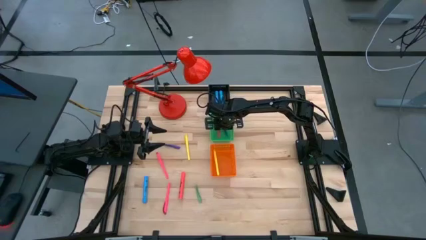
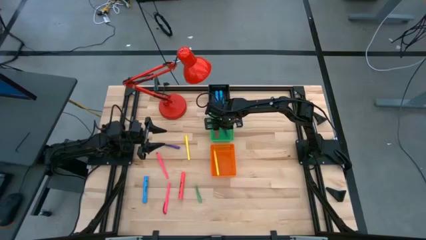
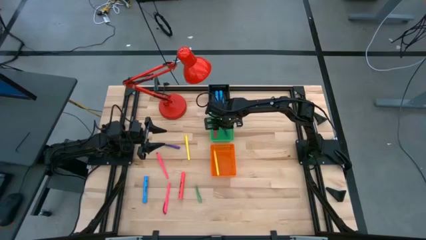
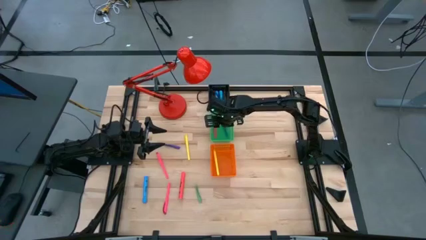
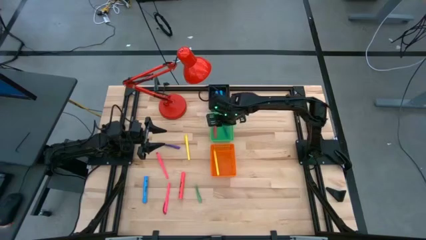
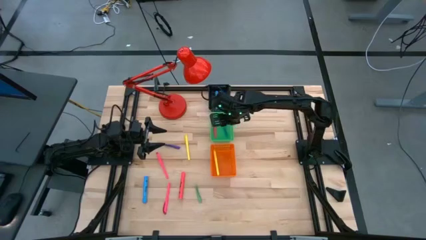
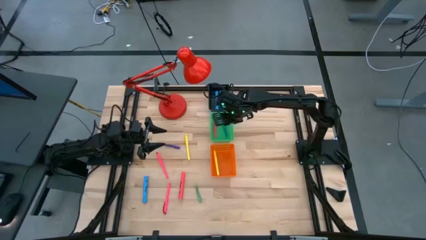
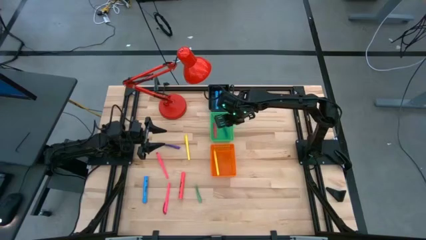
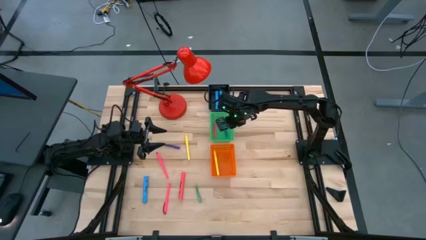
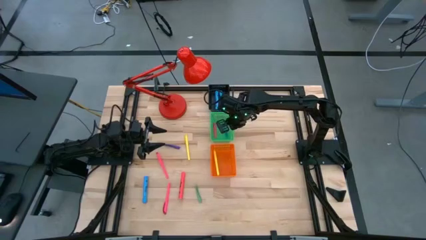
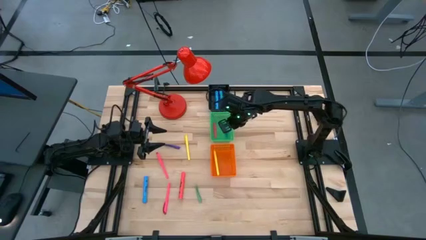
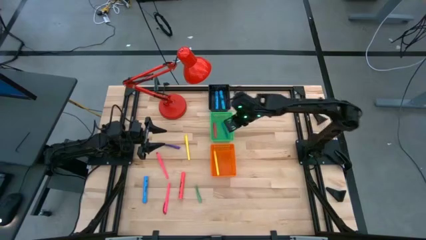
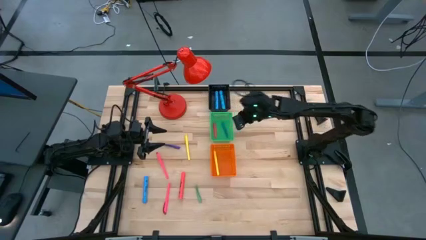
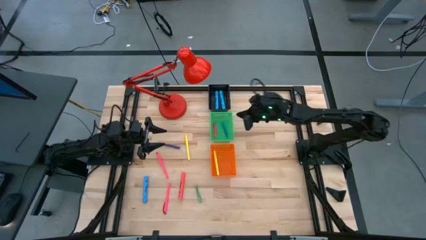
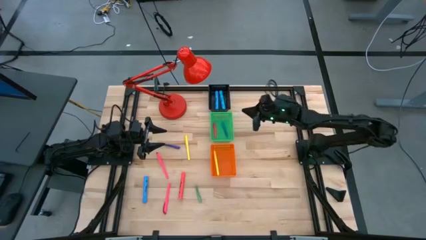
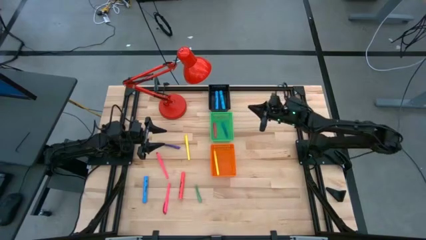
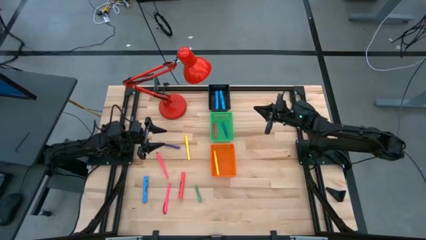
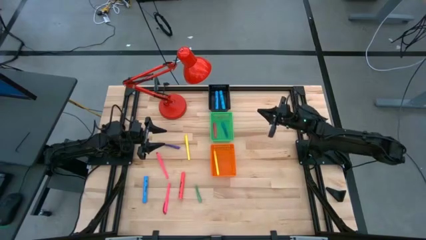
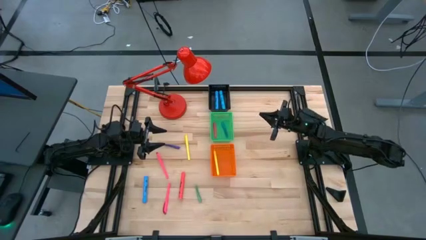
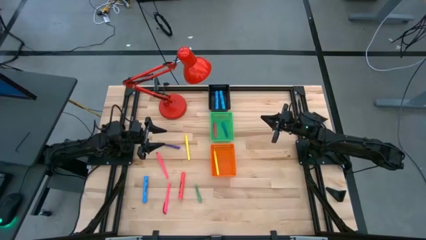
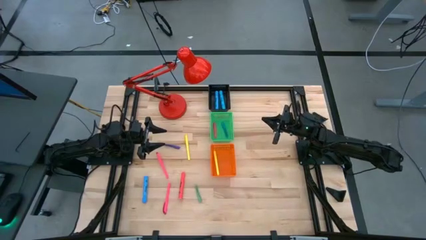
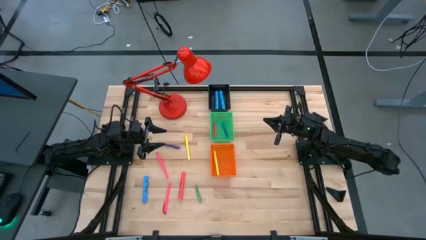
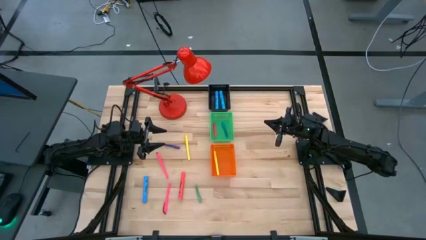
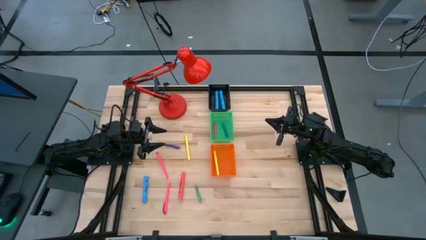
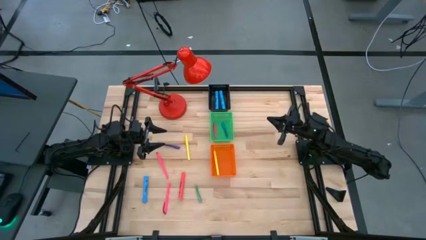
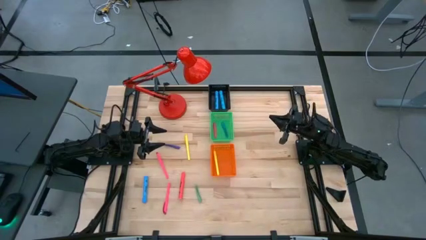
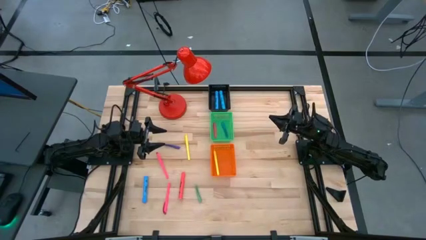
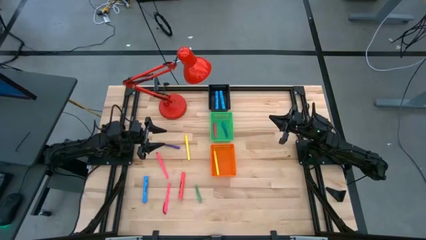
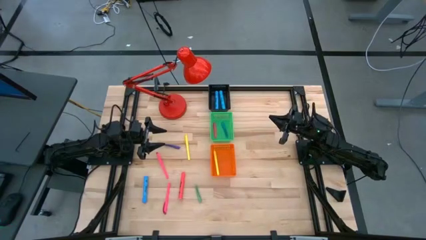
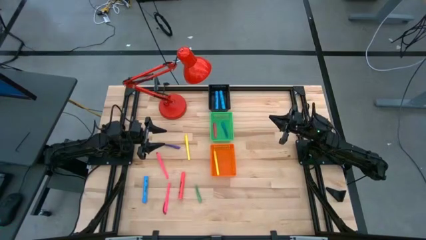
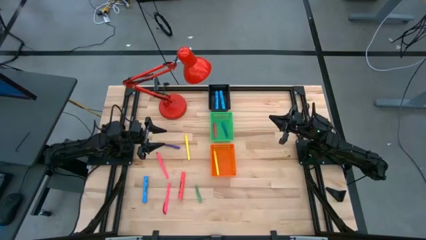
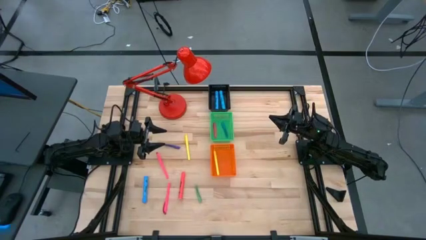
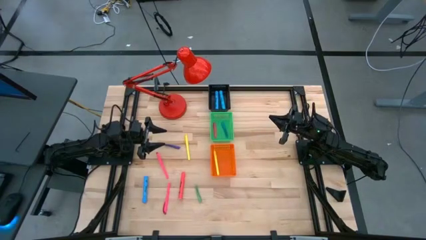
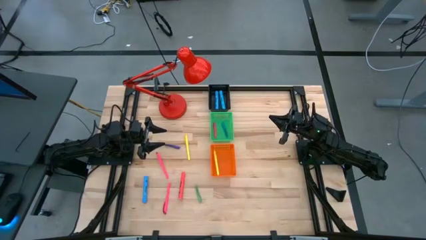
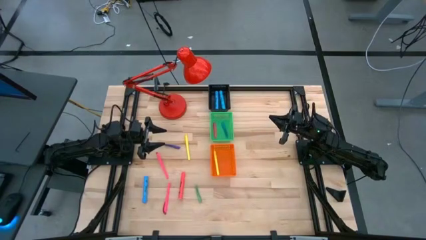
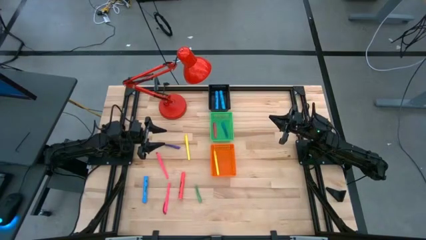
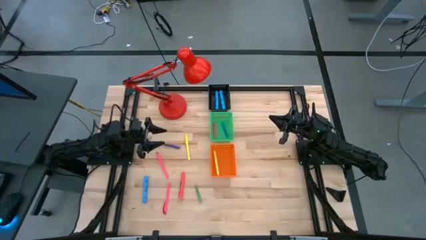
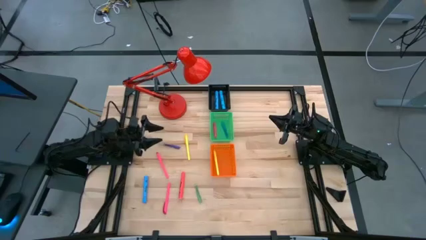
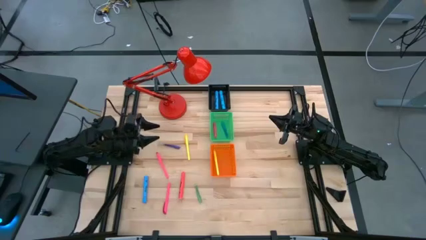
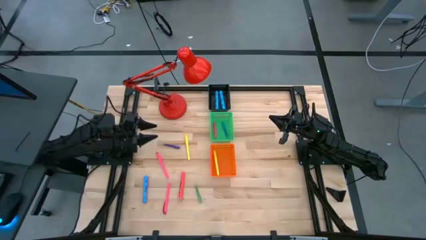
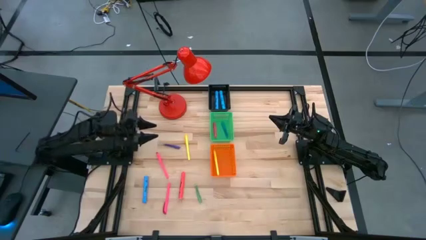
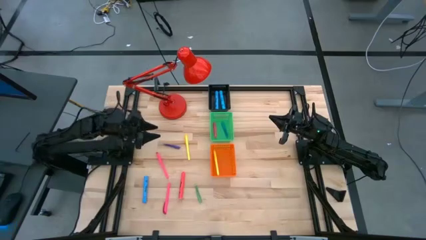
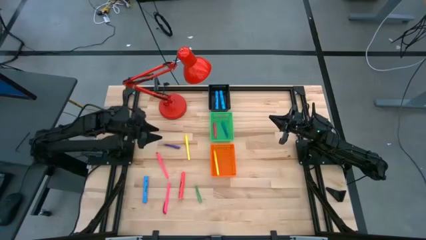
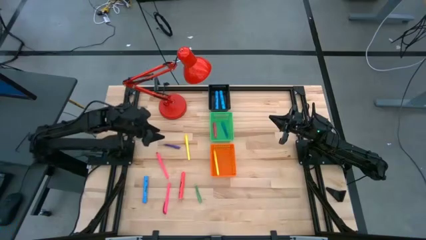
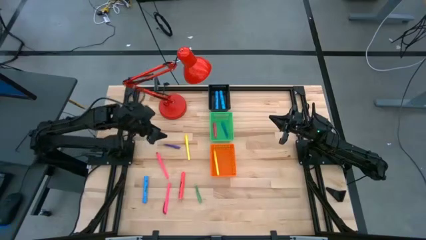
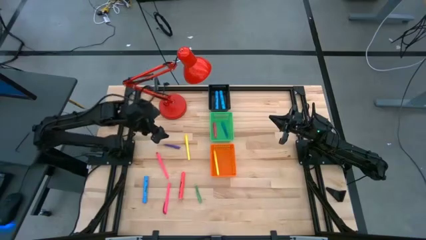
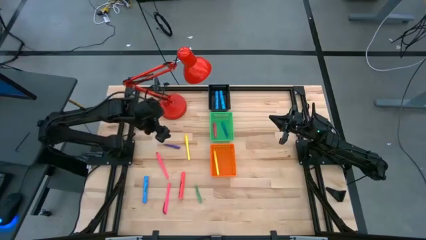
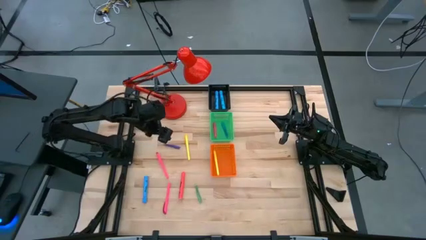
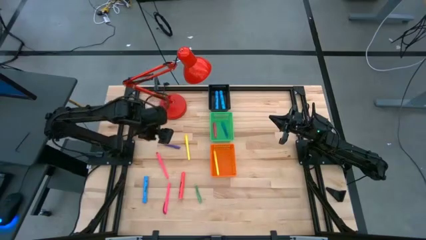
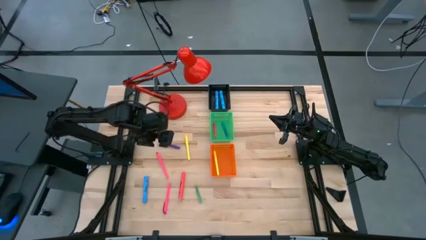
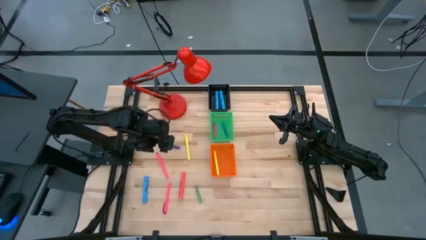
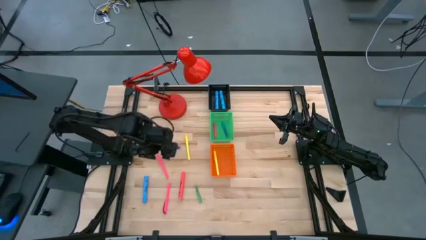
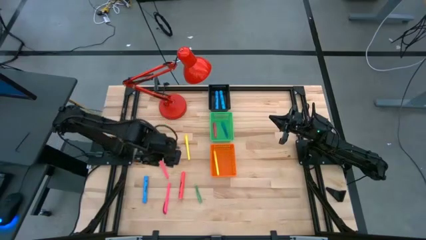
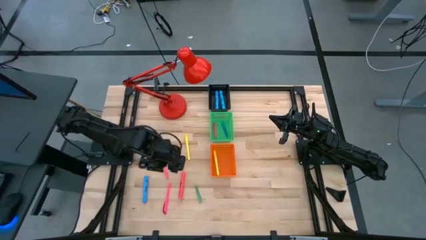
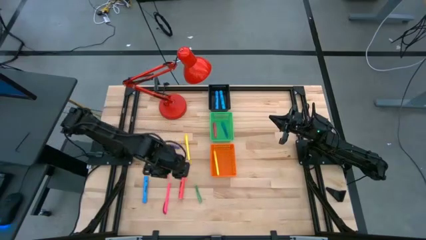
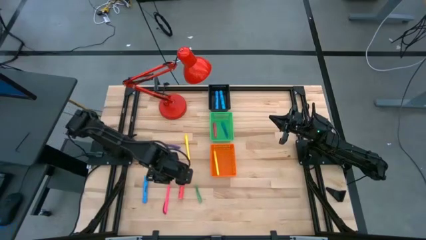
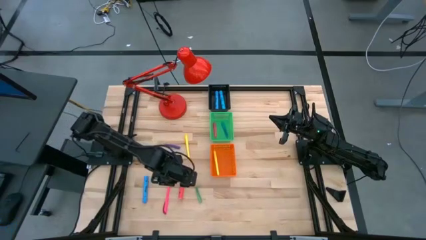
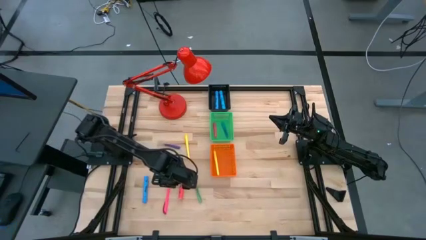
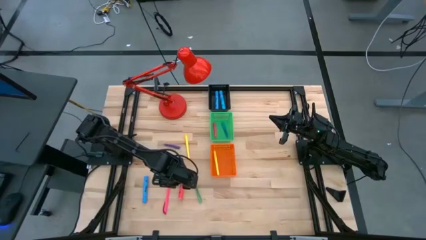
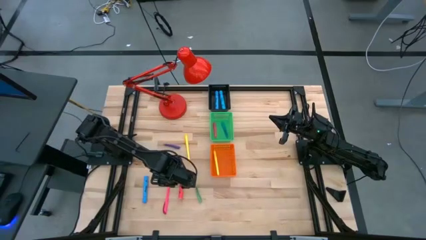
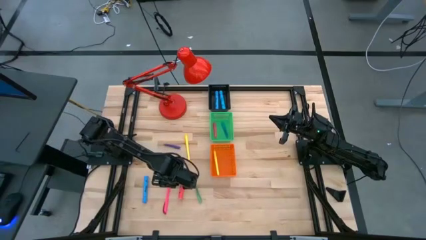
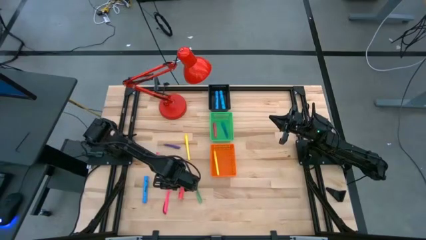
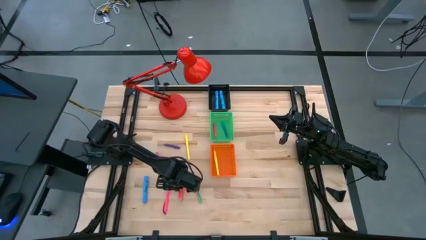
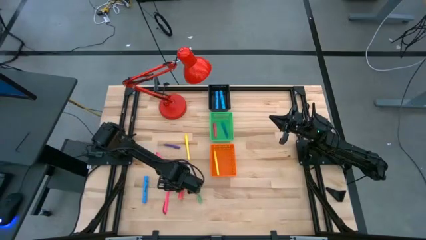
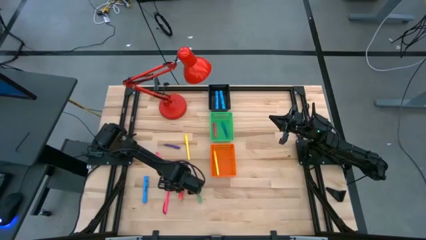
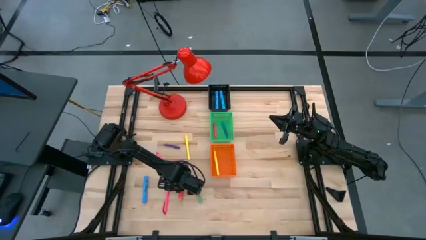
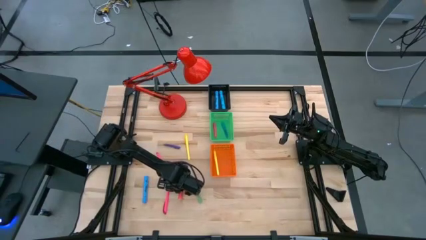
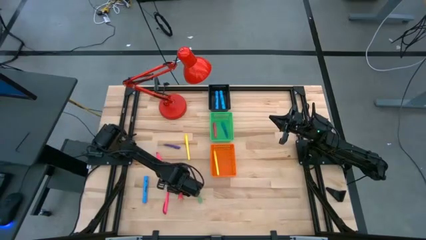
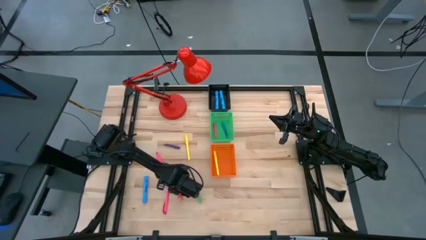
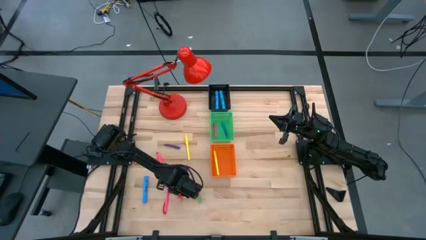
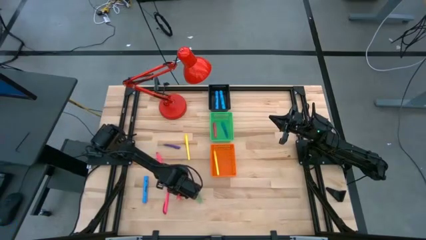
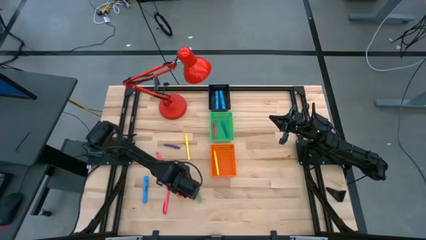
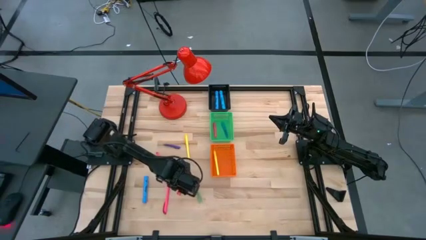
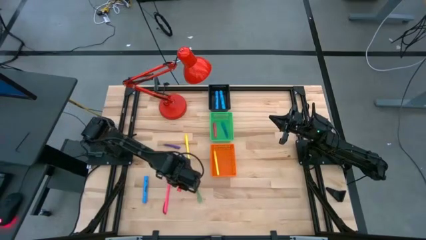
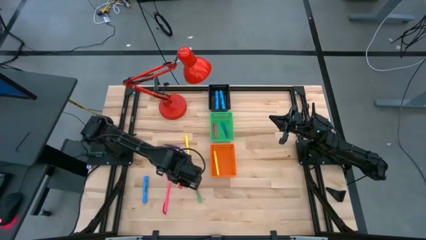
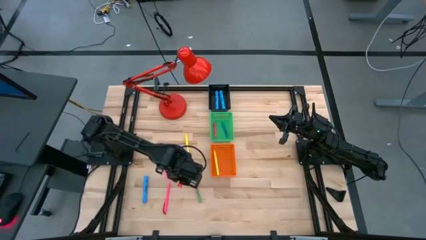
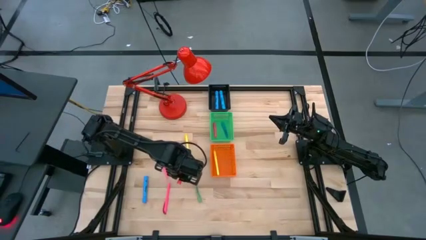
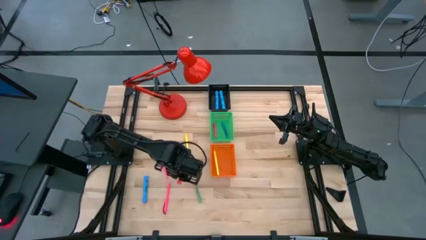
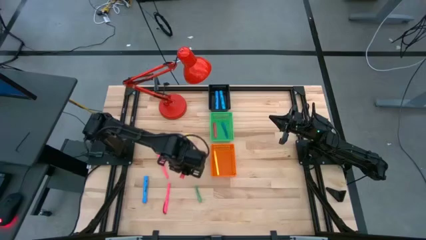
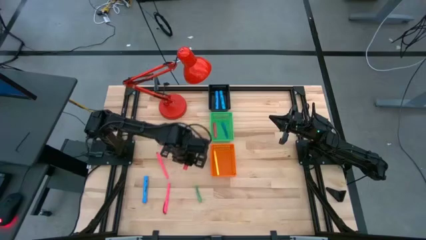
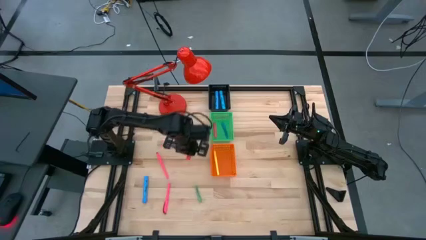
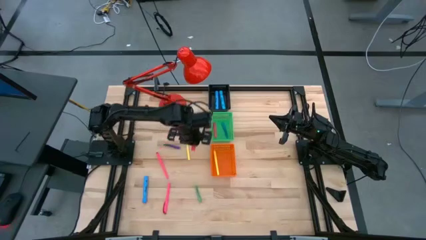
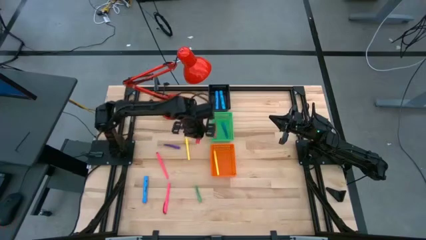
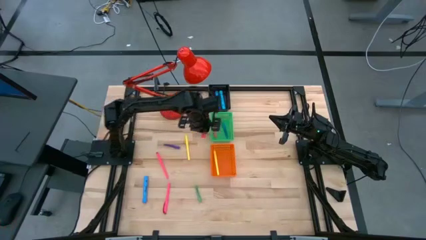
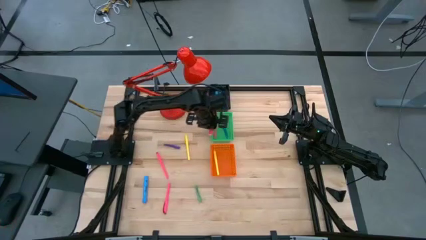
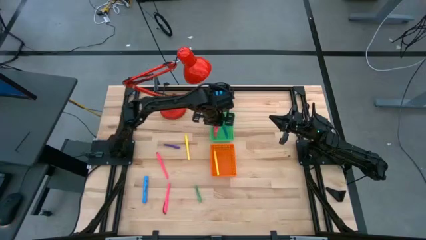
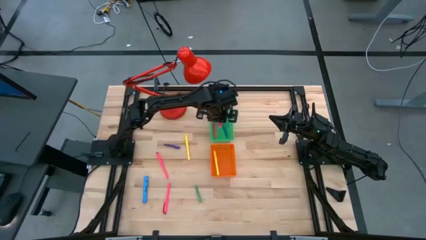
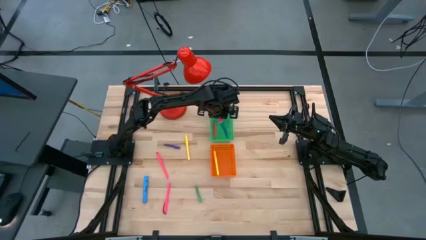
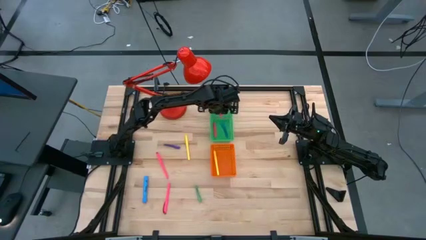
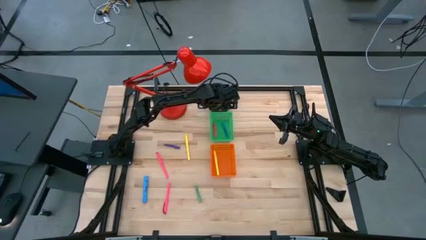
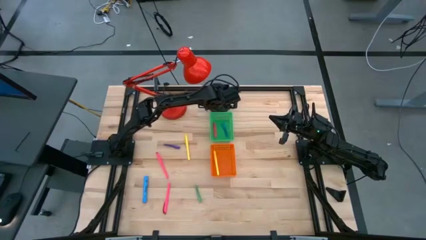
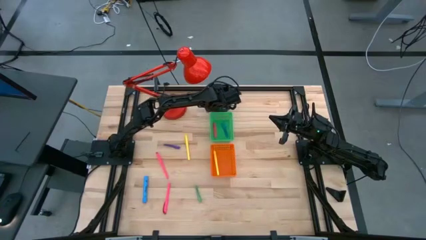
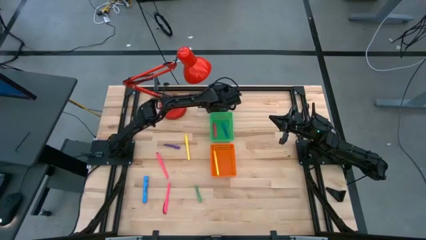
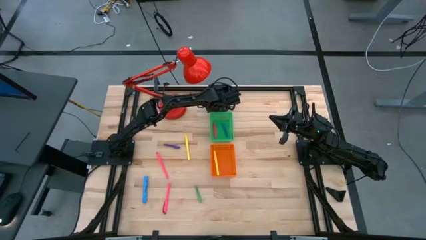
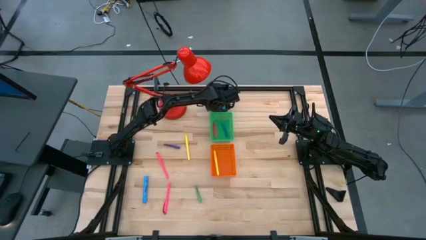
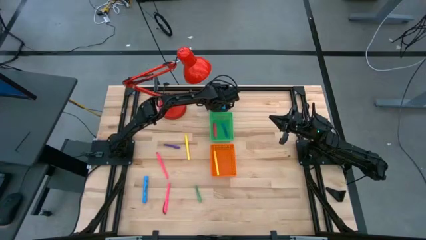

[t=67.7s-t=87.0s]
Task: Pick & Place Markers
Put the orange highlighter into the black bin
